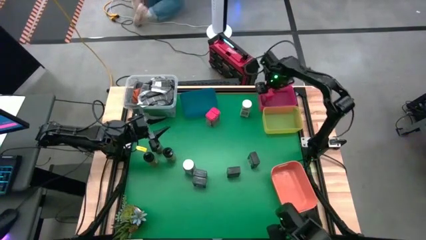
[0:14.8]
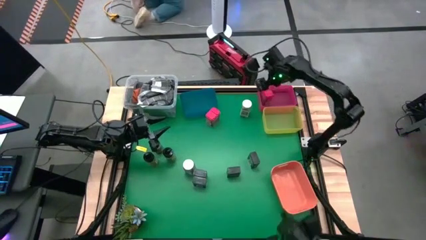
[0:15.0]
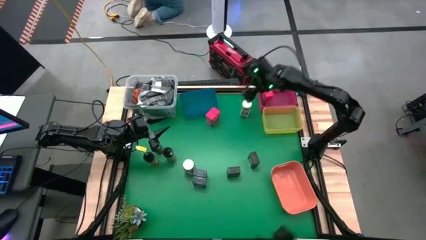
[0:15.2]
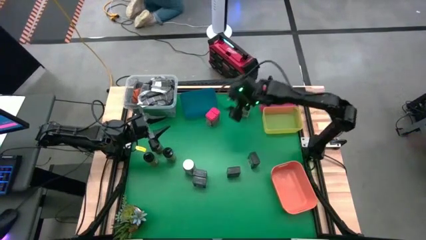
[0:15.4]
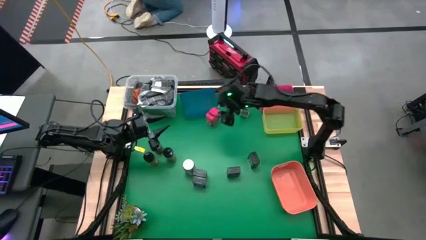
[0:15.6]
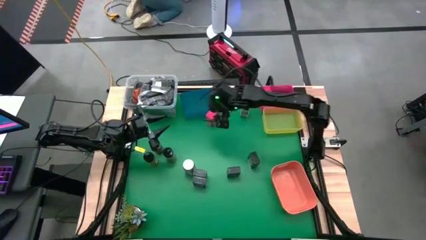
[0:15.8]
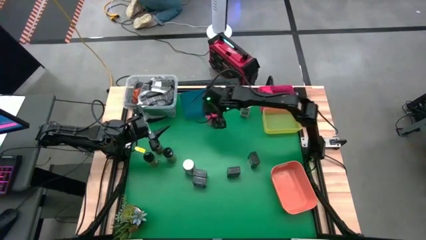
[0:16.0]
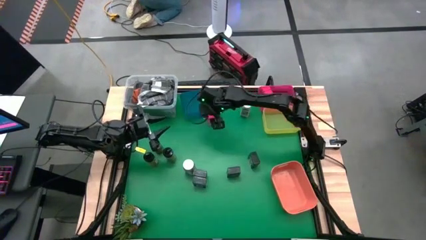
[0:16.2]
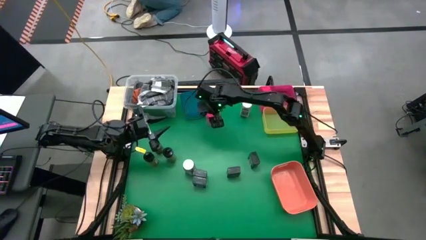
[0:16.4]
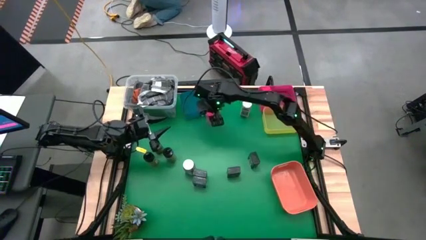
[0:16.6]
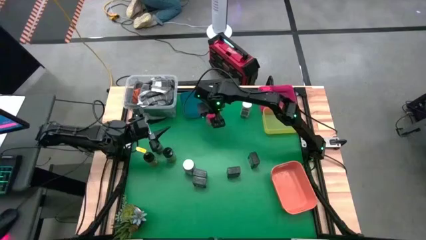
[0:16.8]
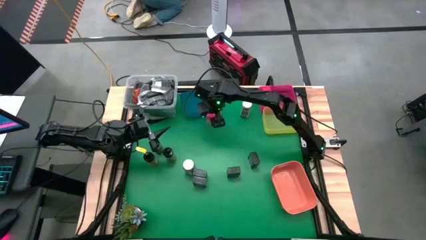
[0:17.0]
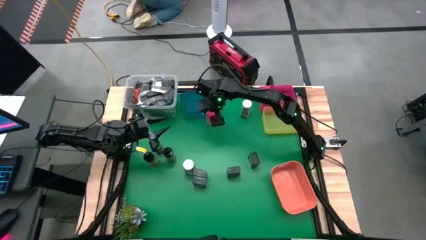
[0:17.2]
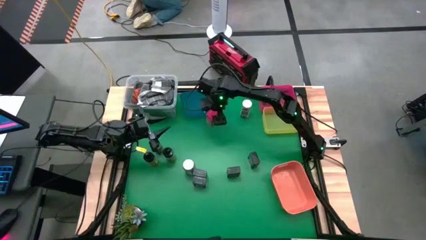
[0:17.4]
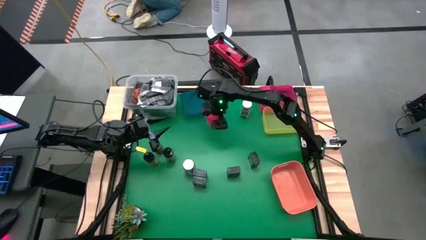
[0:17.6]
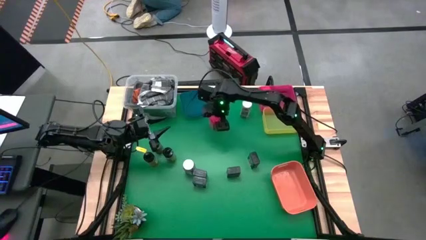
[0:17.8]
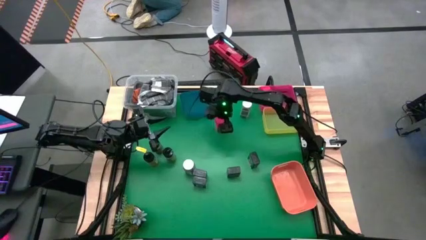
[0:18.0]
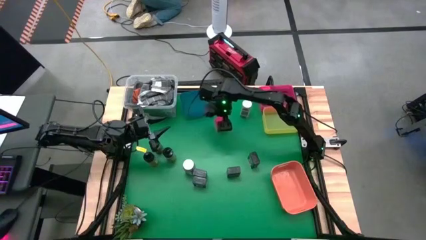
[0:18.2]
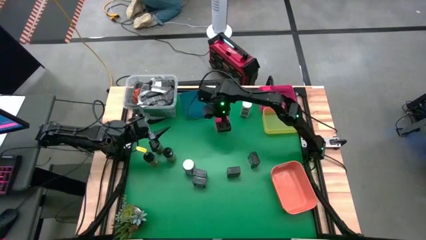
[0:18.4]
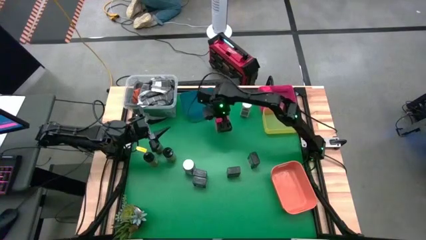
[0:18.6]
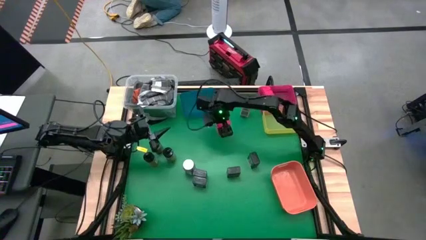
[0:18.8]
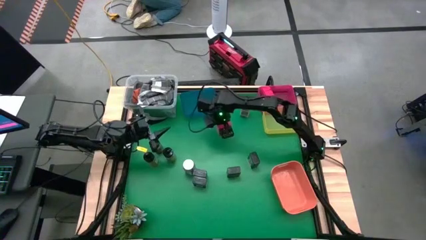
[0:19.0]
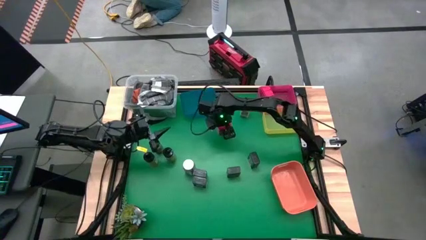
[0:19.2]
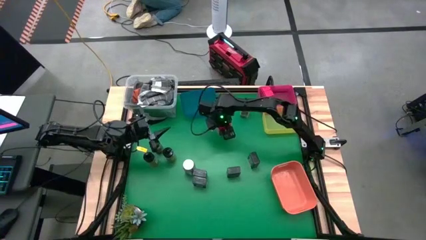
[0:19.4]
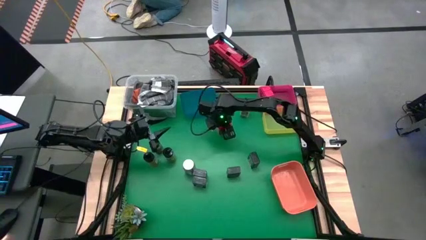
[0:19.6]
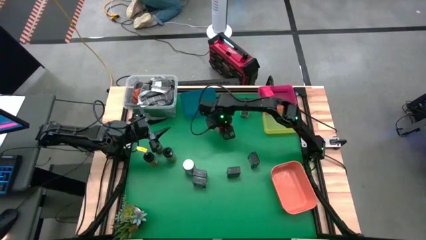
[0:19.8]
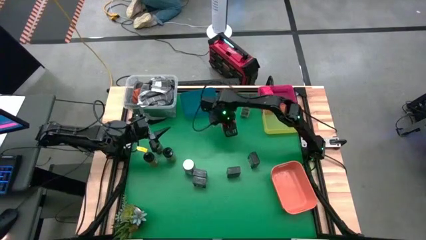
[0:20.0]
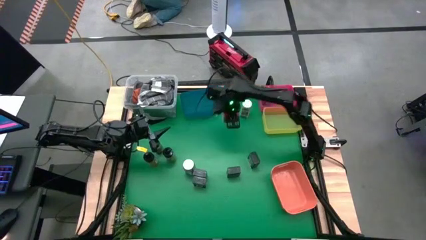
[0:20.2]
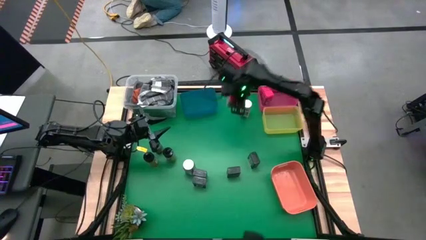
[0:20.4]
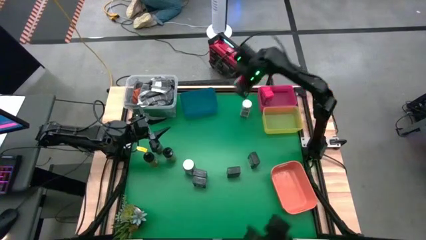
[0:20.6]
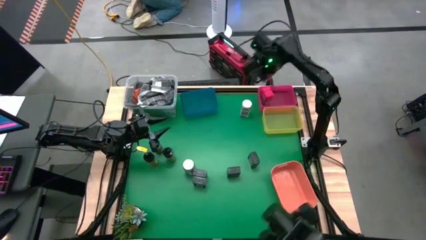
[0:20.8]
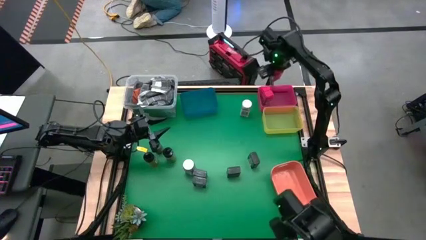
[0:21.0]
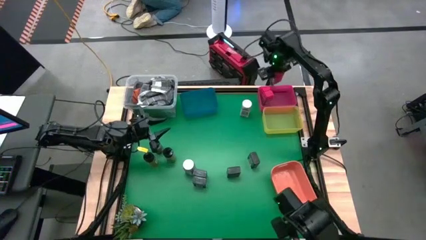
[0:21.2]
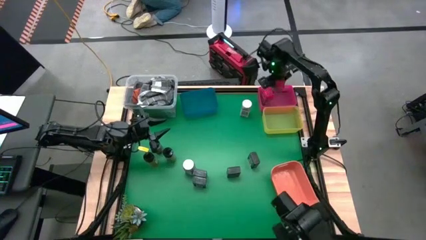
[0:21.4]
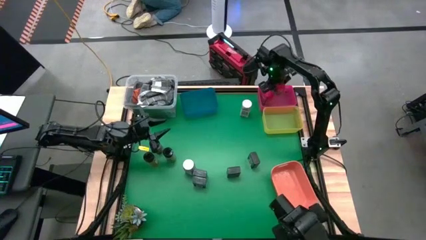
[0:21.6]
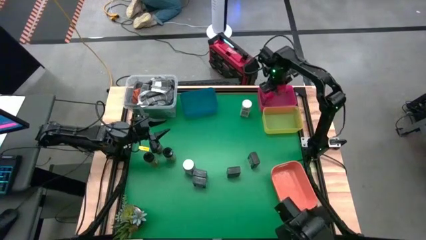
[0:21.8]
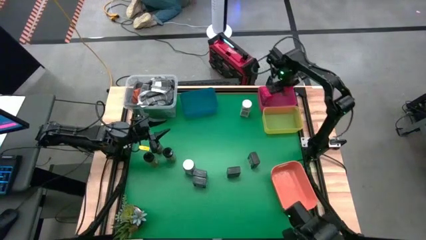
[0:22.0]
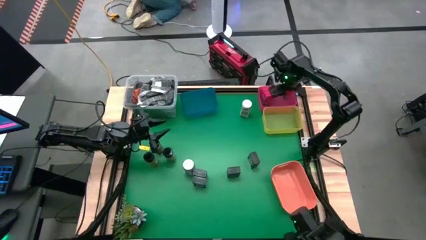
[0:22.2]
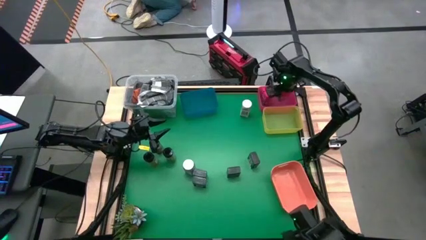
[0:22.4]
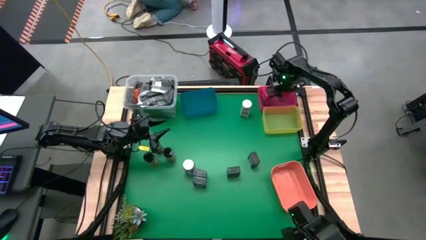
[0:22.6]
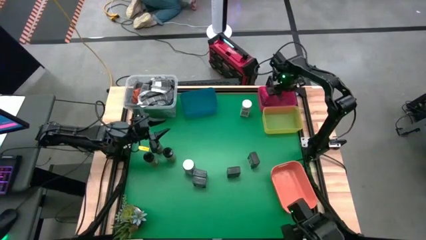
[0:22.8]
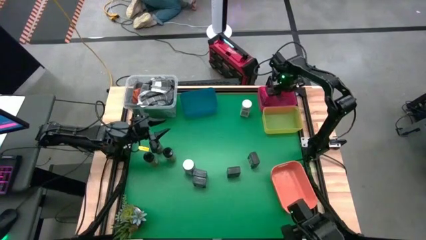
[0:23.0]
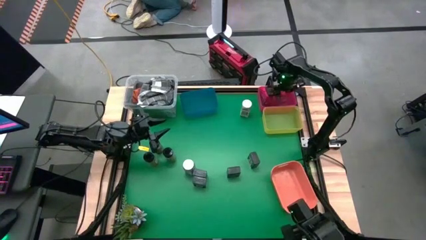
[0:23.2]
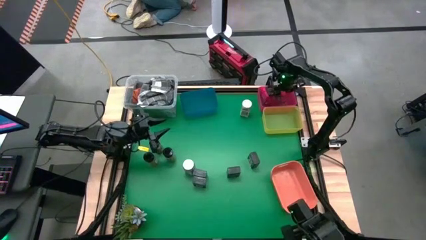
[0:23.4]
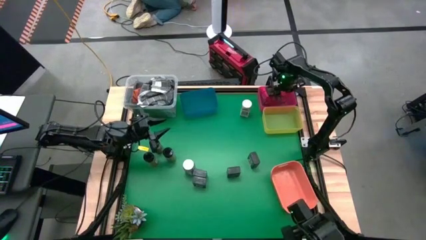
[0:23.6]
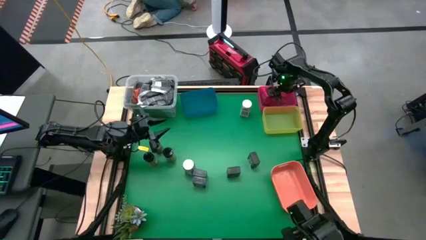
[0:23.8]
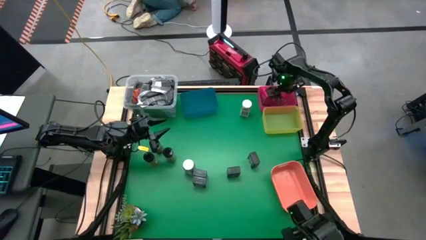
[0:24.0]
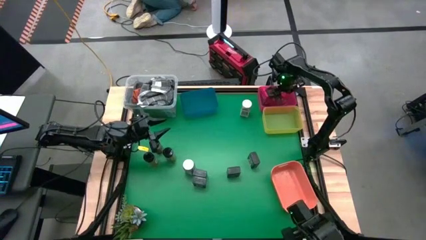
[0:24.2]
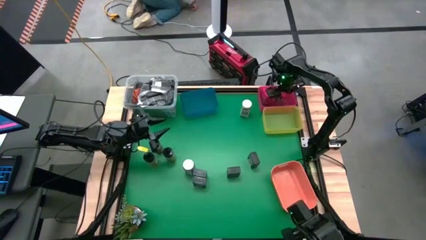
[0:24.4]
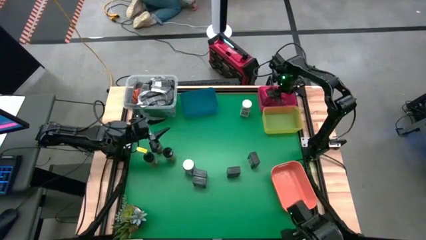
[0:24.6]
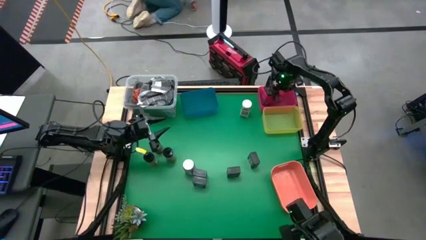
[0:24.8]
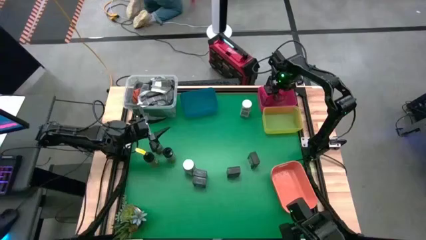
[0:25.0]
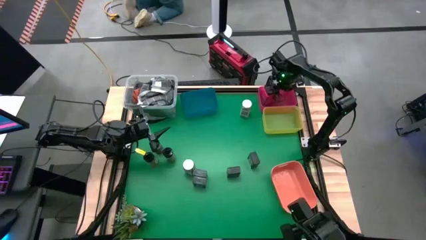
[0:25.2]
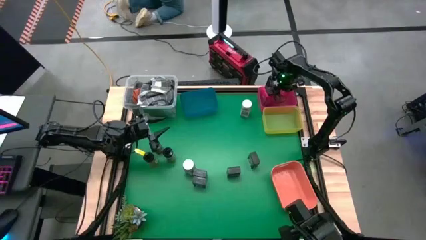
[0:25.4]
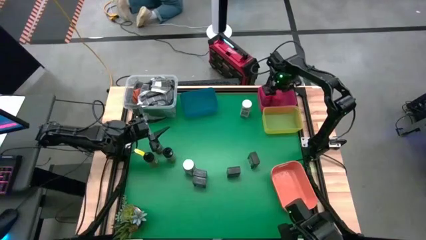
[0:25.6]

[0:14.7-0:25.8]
Task: Sort spices by type
Put the red seasoning from the top middle into the red bin
